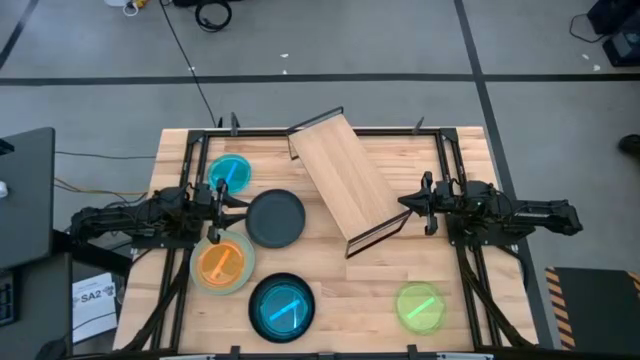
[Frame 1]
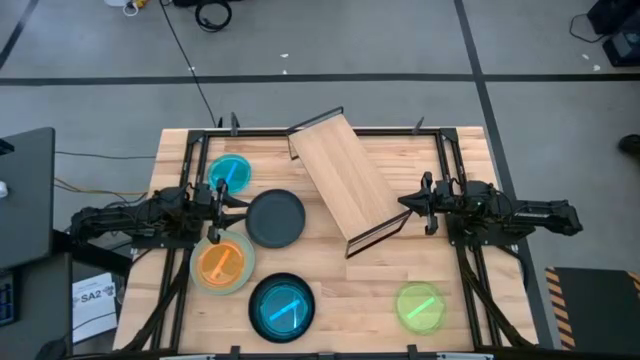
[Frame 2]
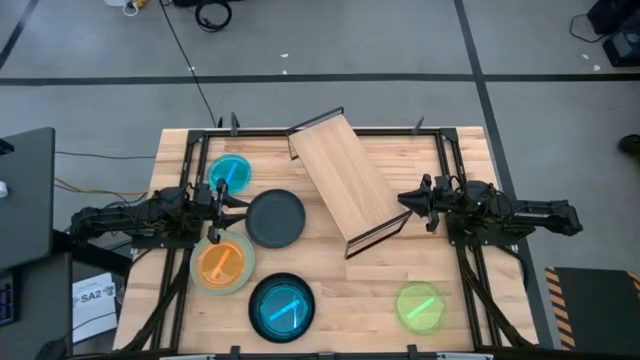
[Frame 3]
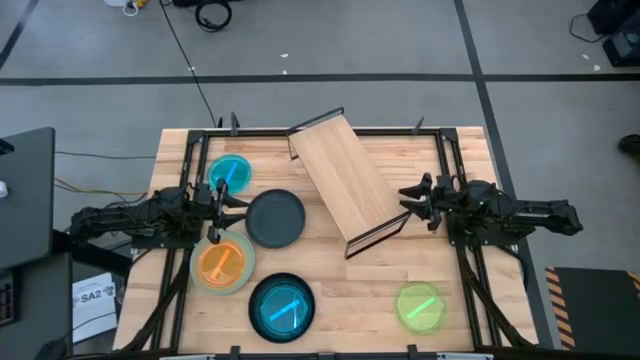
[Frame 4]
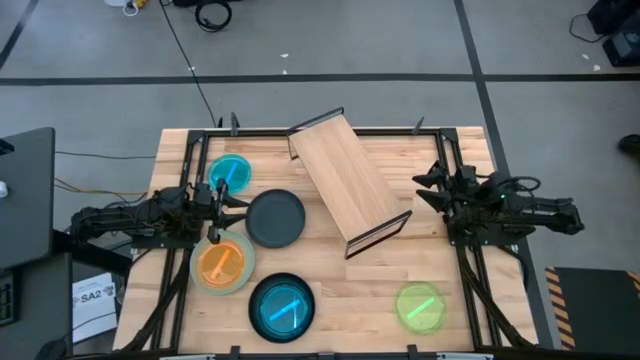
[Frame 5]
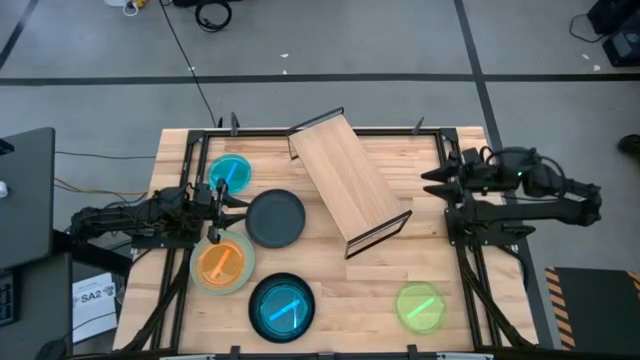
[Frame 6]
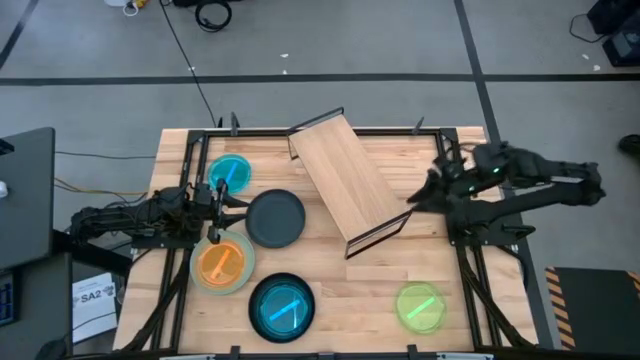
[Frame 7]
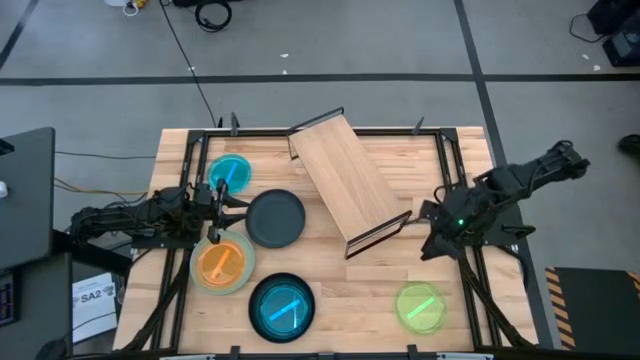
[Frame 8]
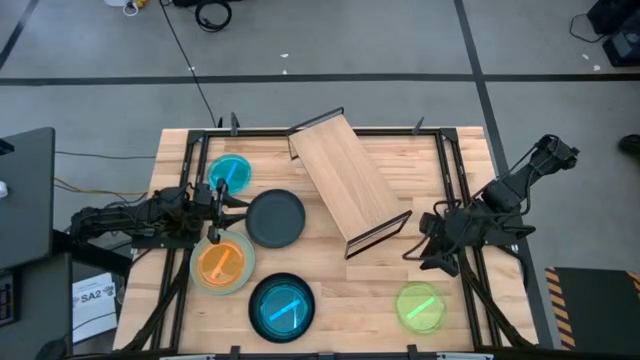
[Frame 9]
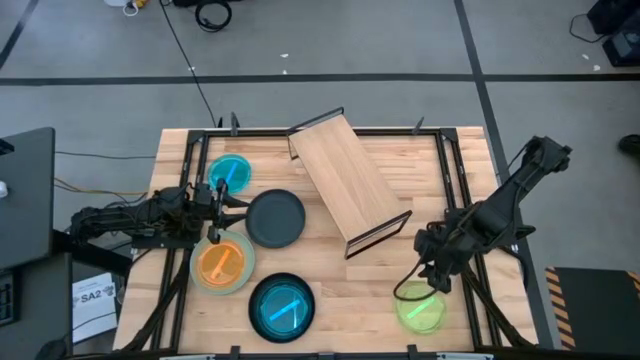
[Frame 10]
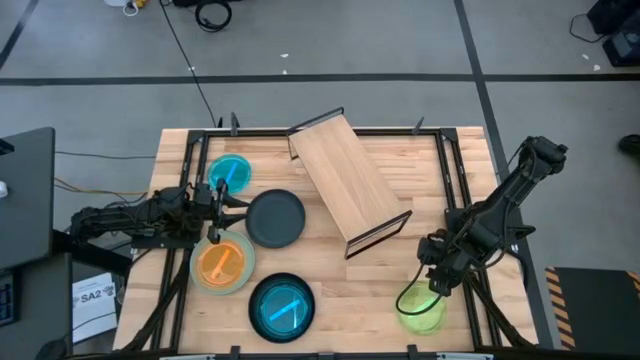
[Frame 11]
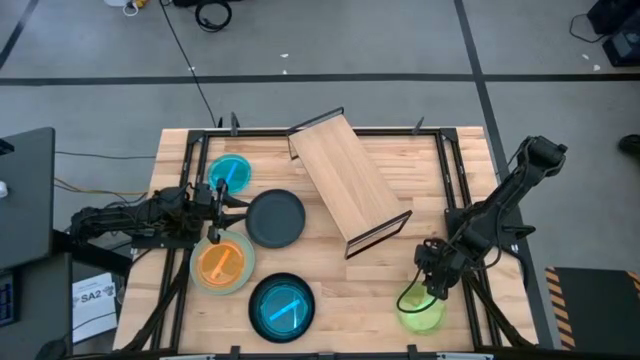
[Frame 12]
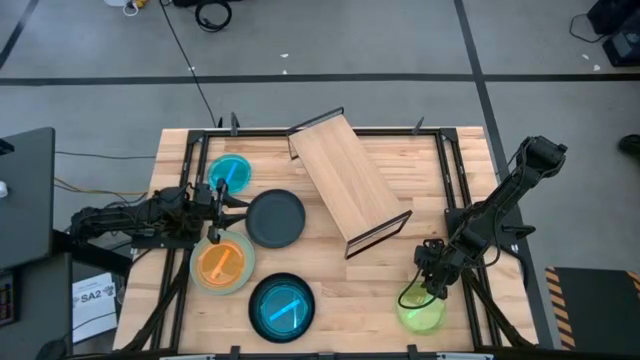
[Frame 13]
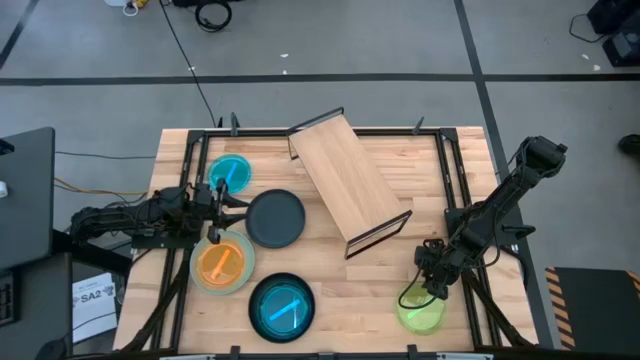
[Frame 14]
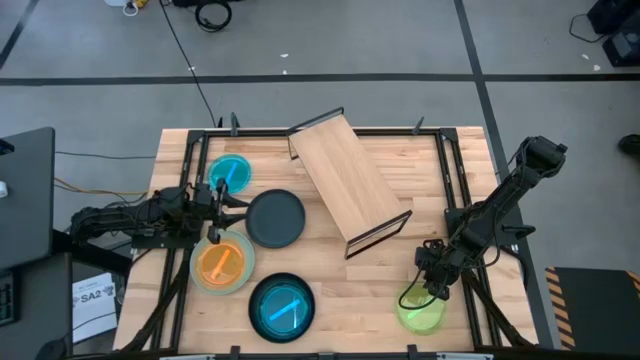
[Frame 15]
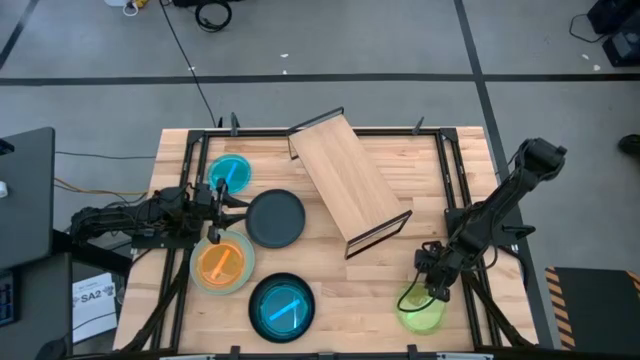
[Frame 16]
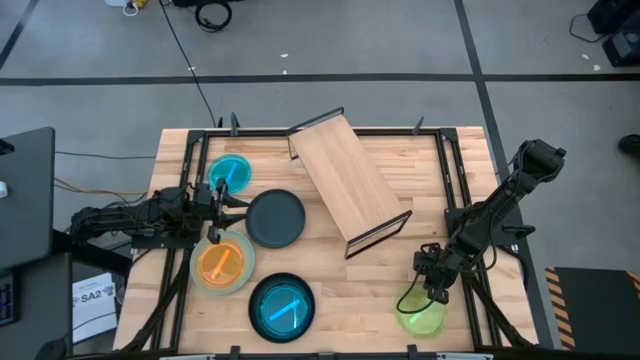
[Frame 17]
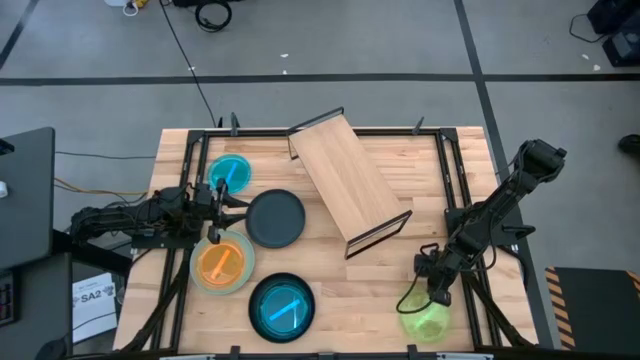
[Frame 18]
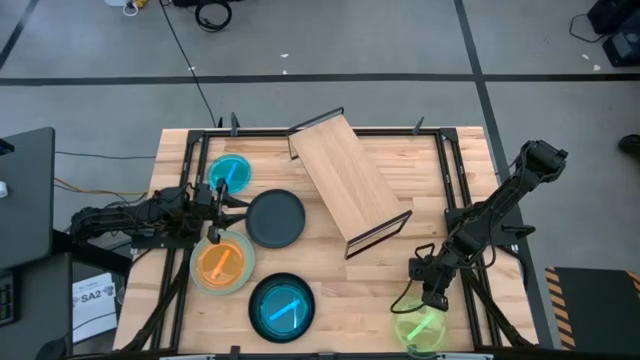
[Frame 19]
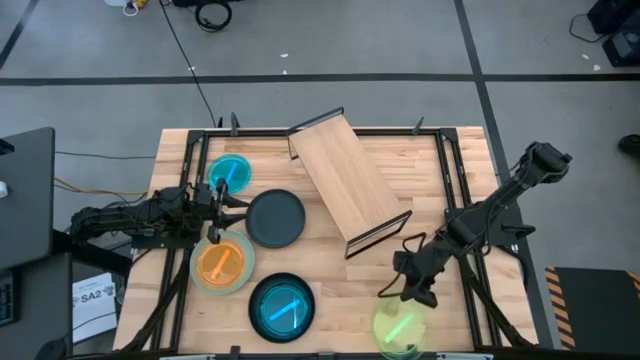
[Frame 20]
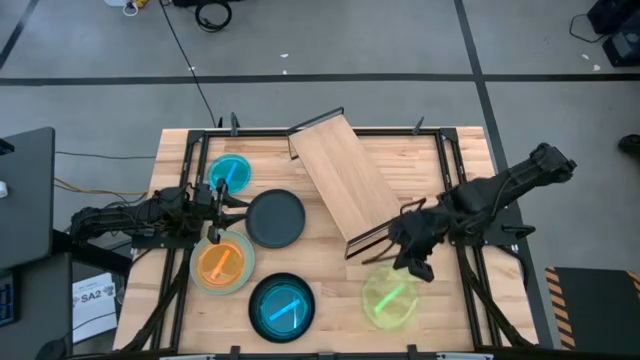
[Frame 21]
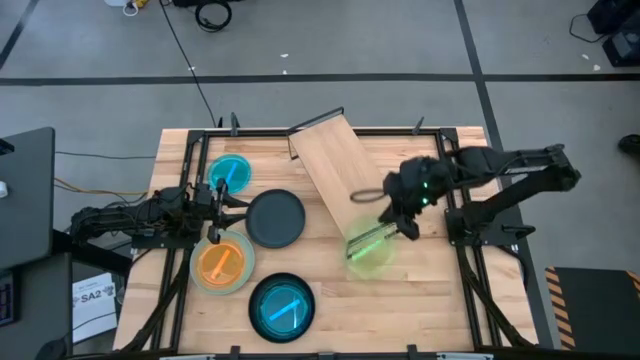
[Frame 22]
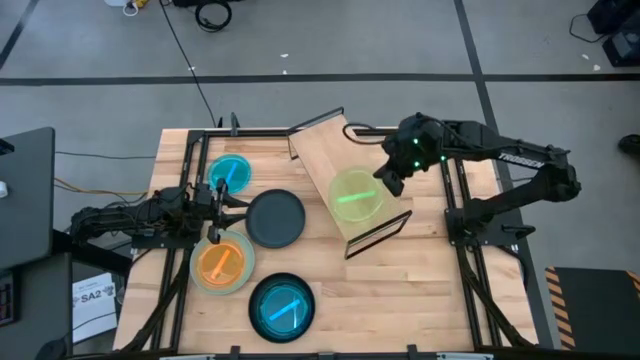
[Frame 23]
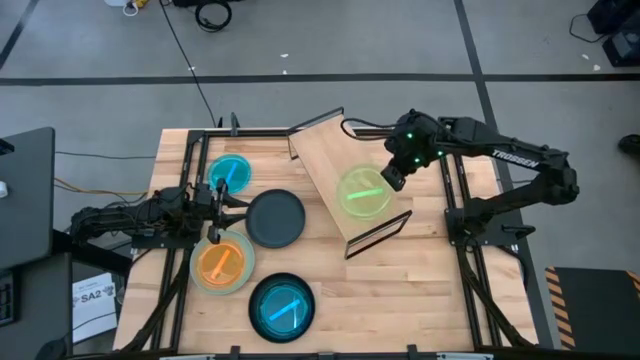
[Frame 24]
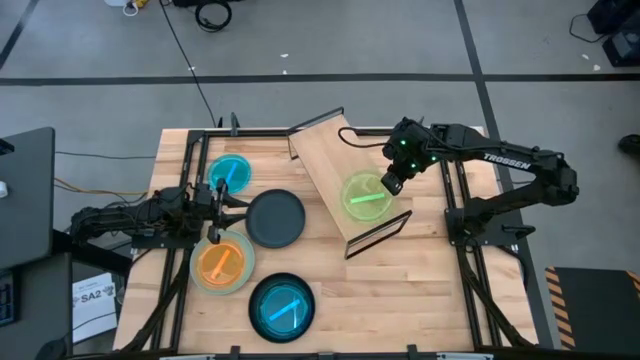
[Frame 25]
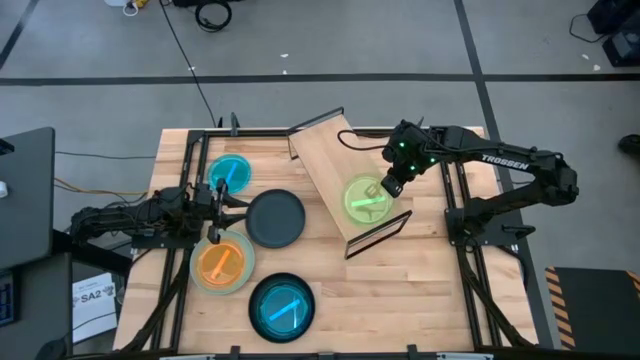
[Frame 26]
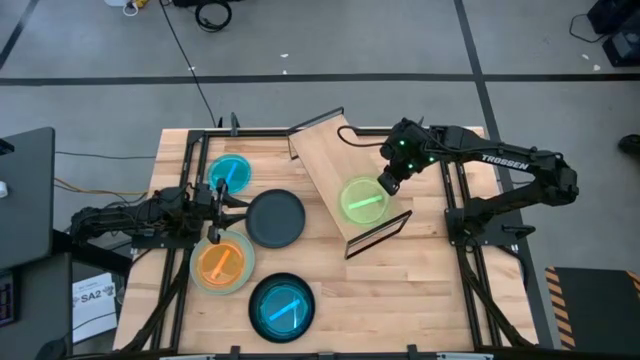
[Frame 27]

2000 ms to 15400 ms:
Task: Place and stack plates onto a shelf
Put the transparent green plate on the shelf

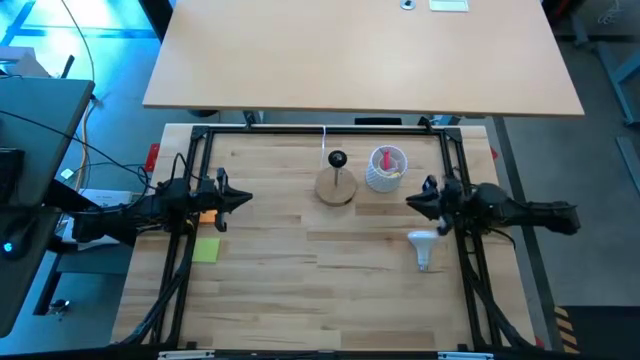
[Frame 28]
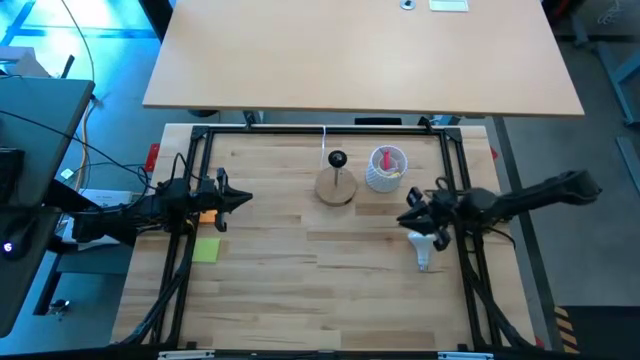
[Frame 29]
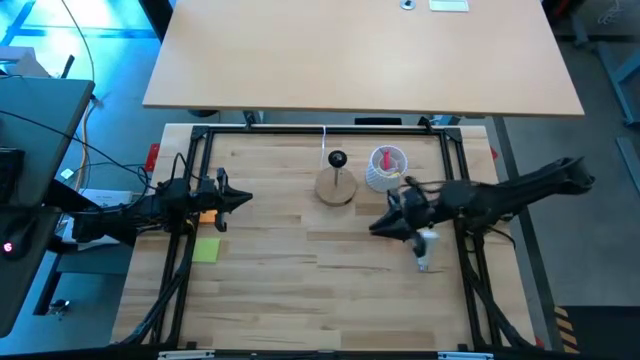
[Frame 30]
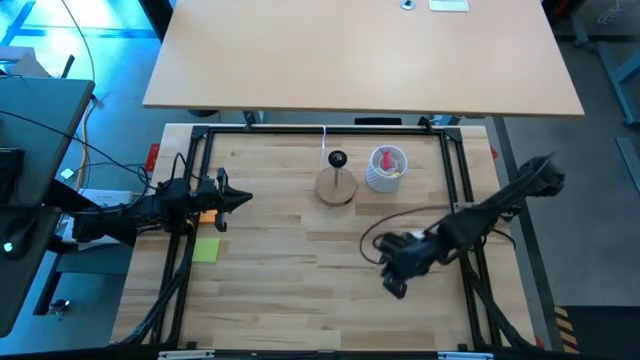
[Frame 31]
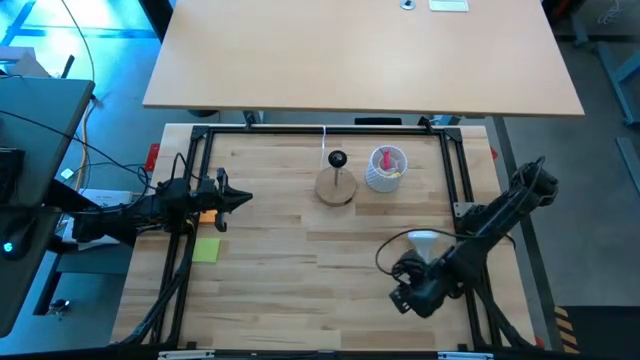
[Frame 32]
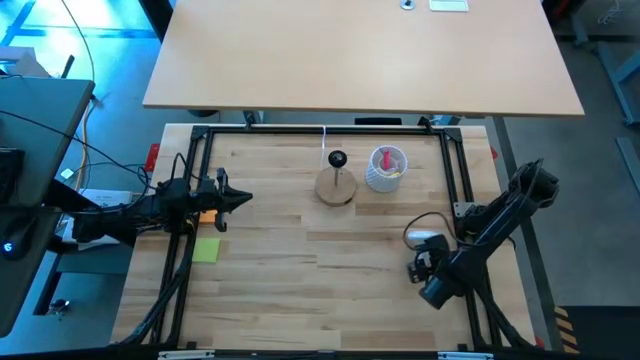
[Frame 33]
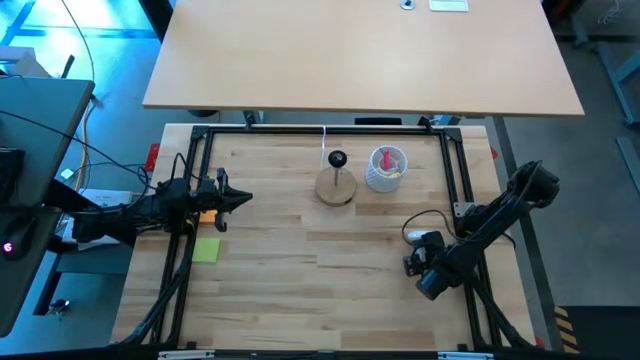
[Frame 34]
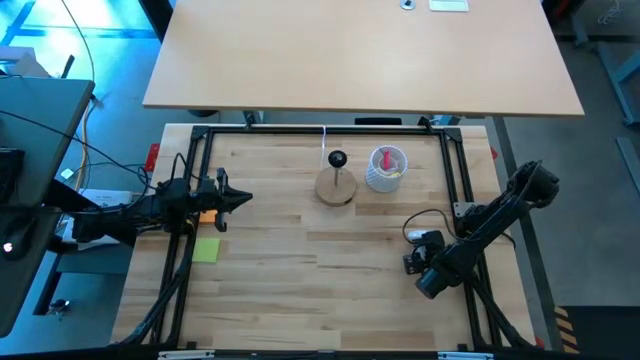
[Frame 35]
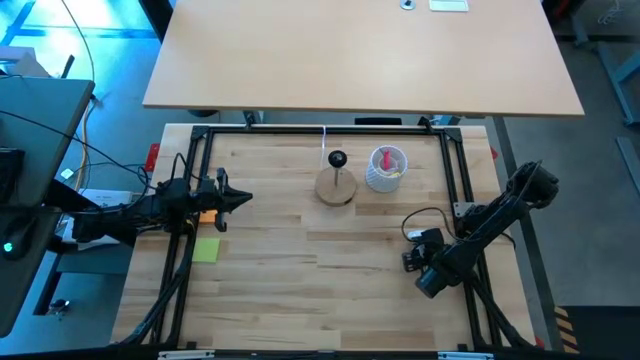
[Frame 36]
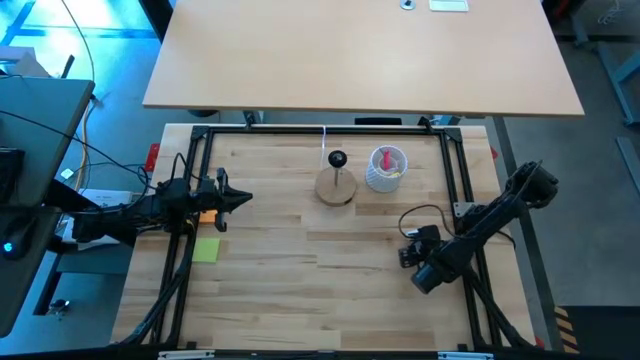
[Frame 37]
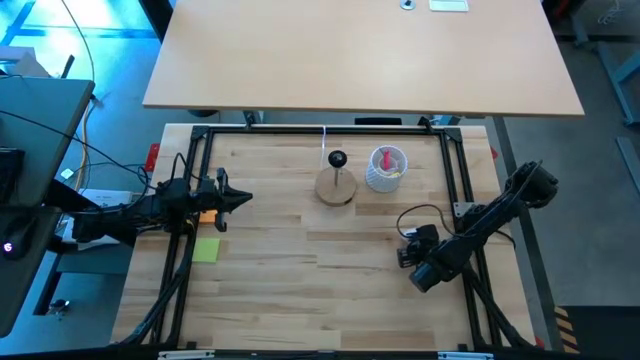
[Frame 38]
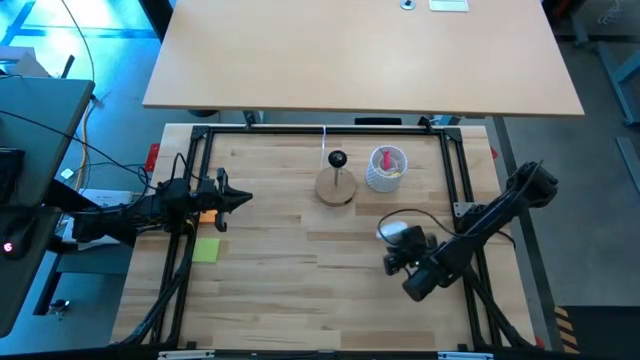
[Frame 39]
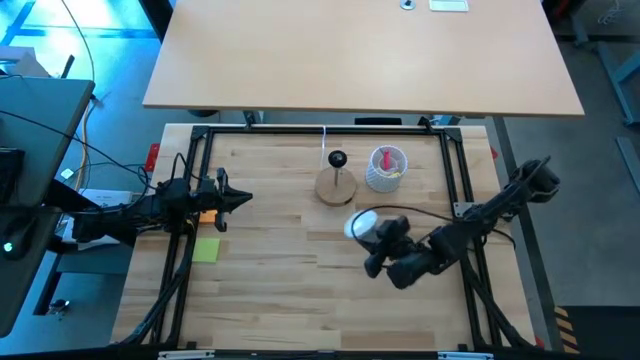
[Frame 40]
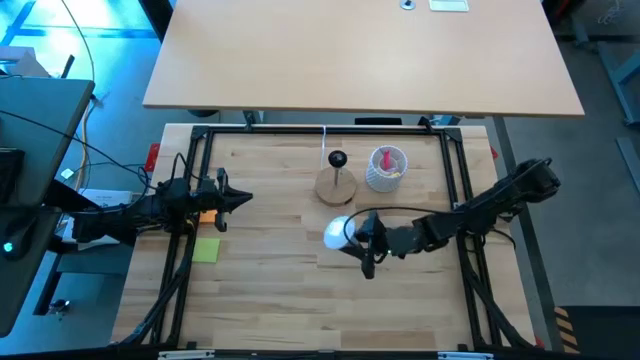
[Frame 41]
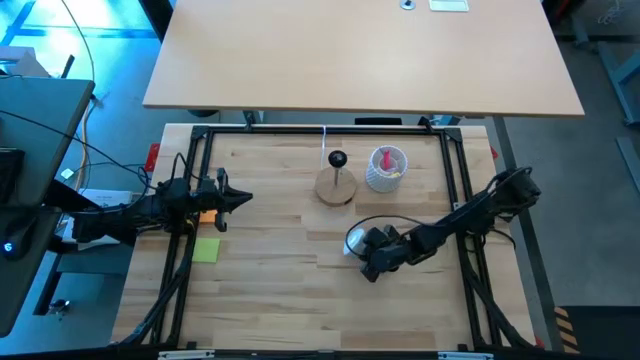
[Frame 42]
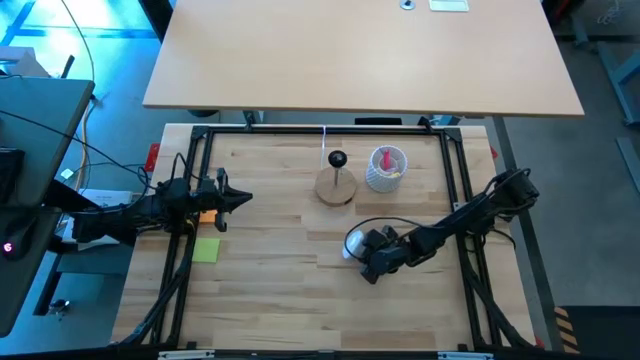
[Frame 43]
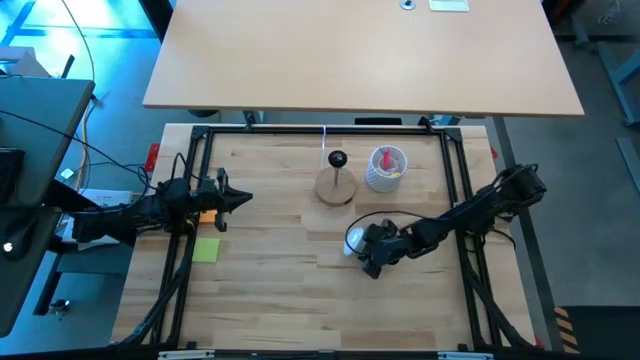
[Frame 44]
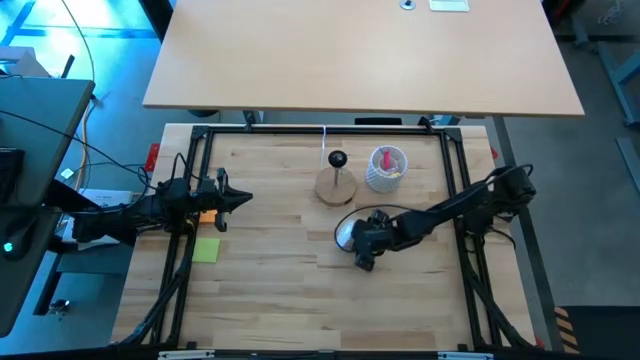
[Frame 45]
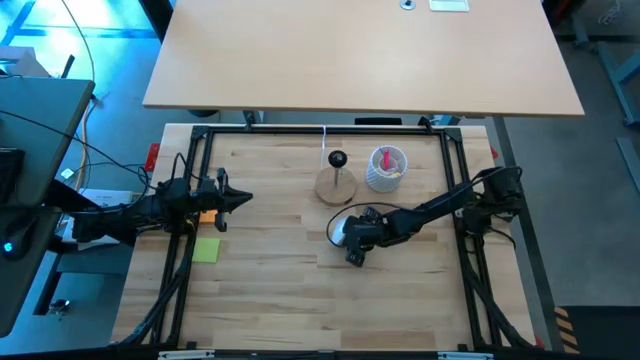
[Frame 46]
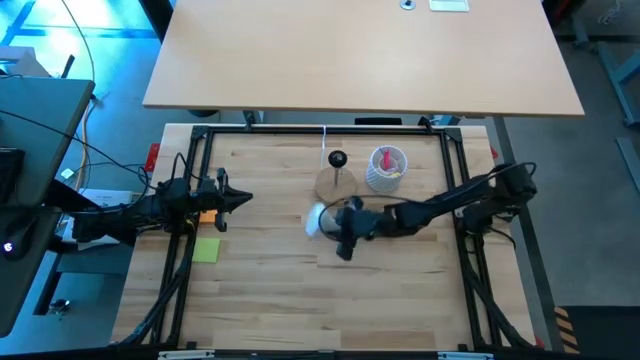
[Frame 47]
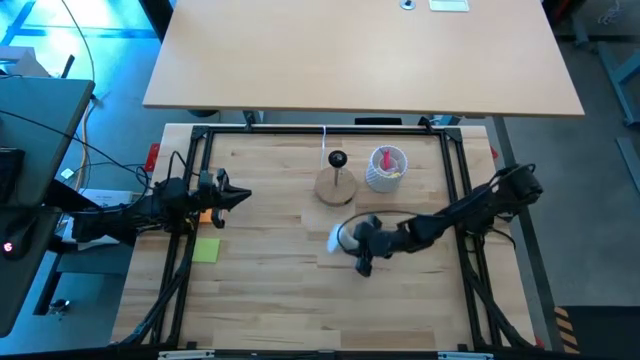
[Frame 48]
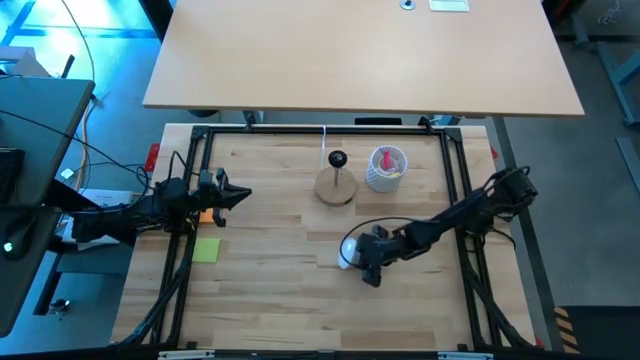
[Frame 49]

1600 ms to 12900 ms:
Task: Screw lightbulb
Insert the white lightbulb into the brown lamp
